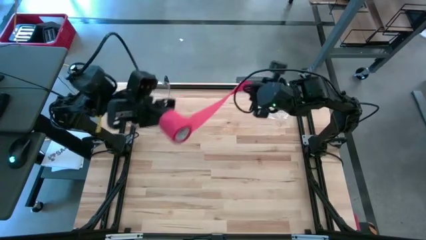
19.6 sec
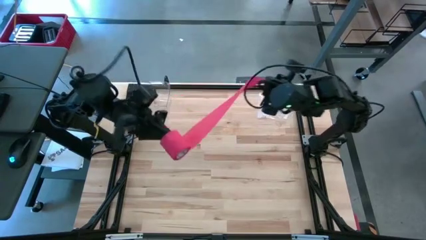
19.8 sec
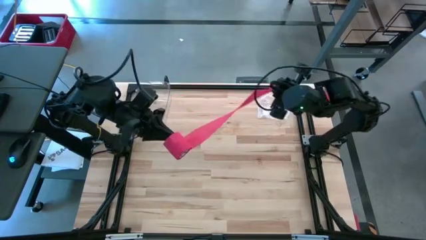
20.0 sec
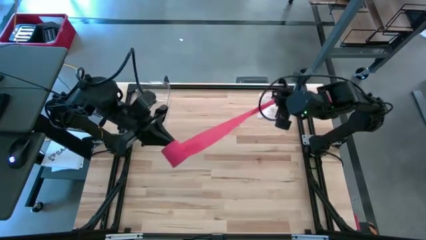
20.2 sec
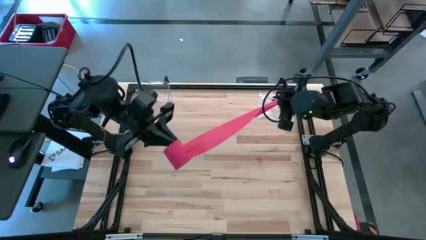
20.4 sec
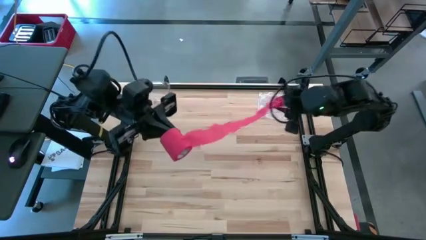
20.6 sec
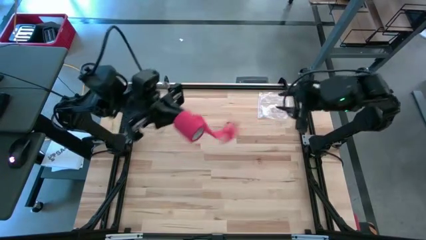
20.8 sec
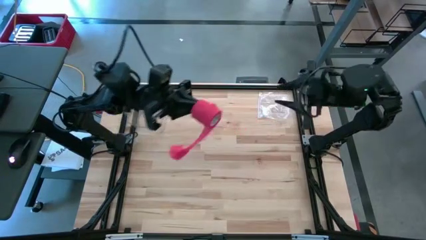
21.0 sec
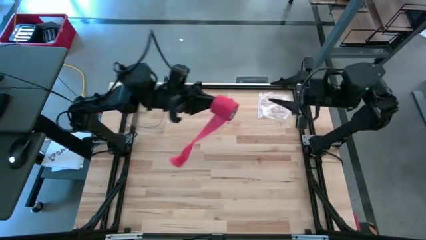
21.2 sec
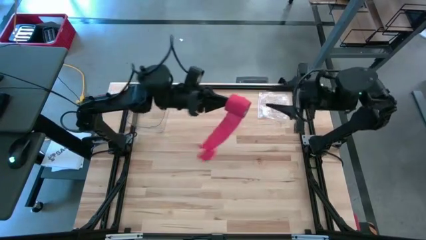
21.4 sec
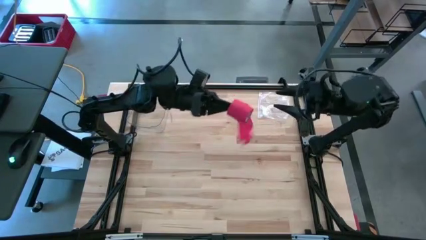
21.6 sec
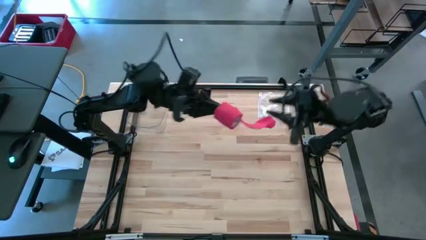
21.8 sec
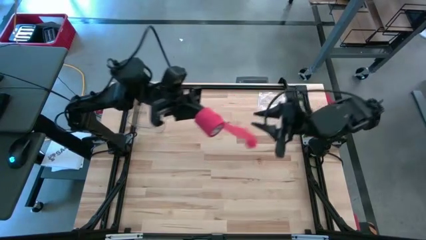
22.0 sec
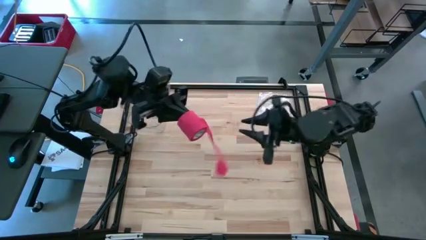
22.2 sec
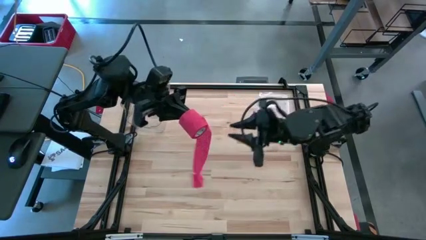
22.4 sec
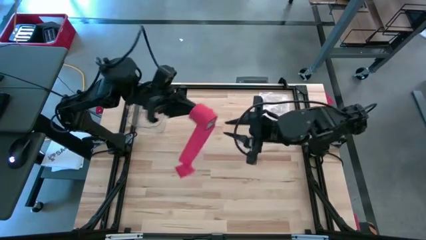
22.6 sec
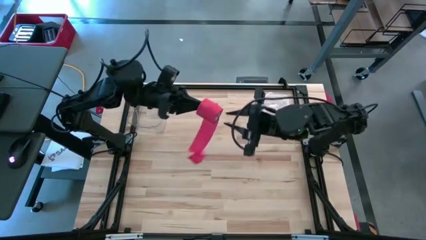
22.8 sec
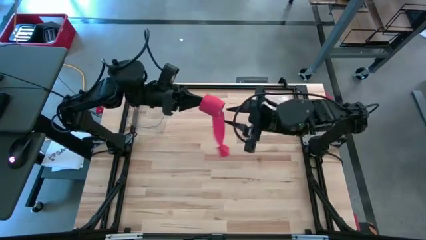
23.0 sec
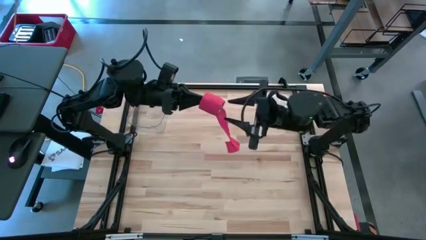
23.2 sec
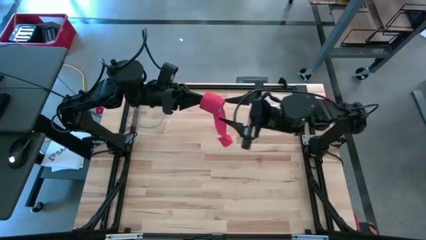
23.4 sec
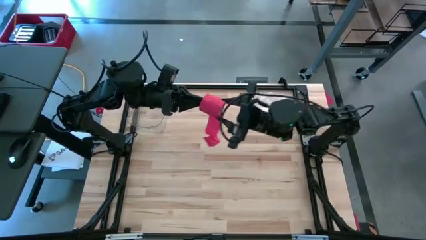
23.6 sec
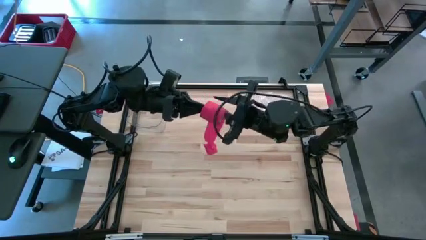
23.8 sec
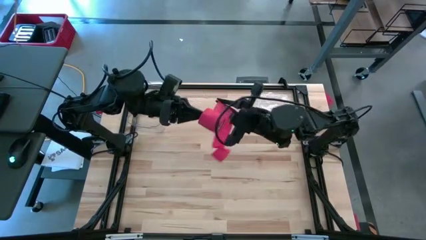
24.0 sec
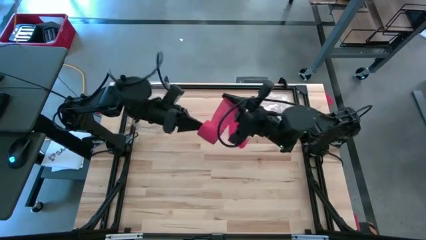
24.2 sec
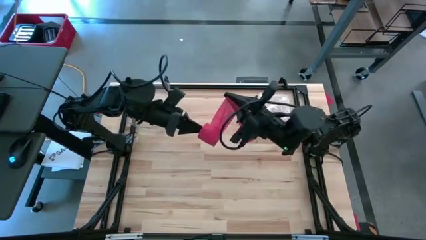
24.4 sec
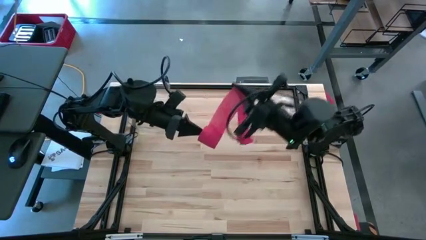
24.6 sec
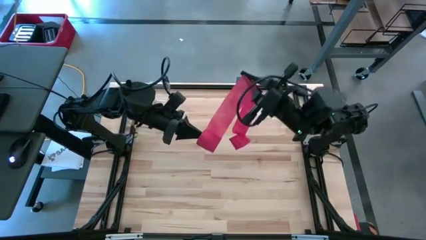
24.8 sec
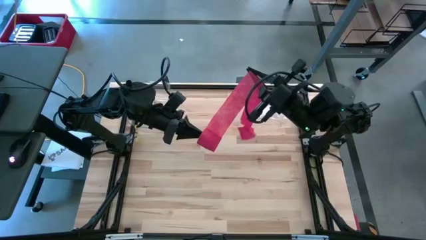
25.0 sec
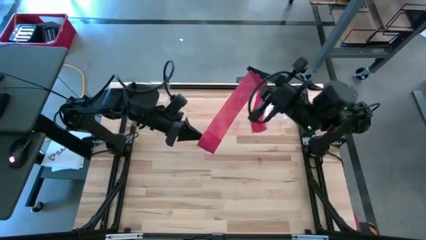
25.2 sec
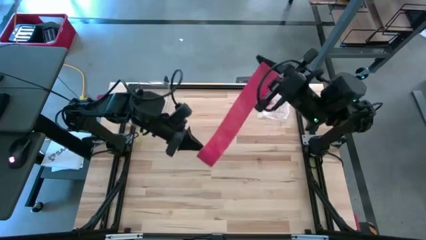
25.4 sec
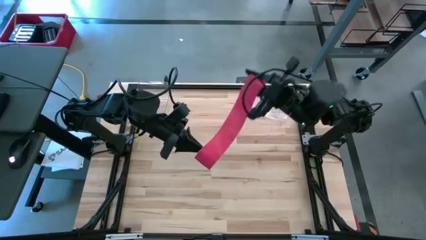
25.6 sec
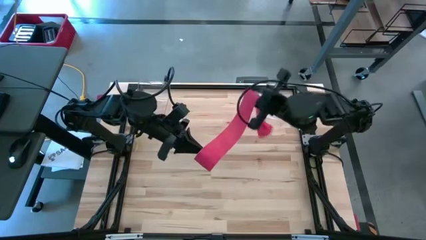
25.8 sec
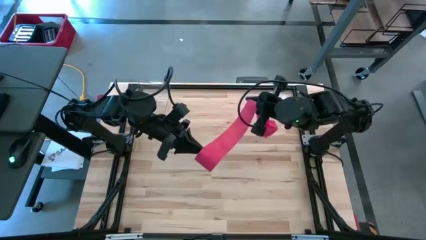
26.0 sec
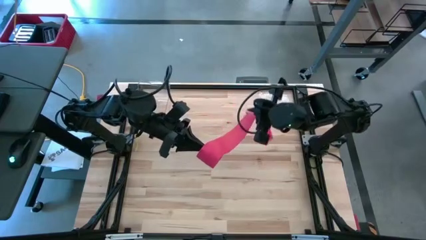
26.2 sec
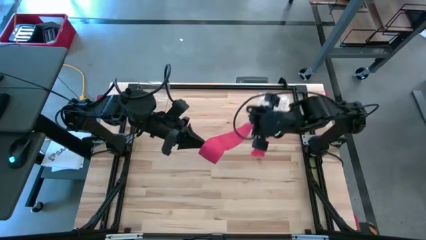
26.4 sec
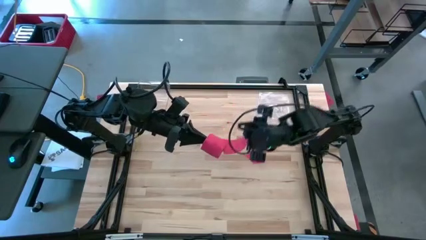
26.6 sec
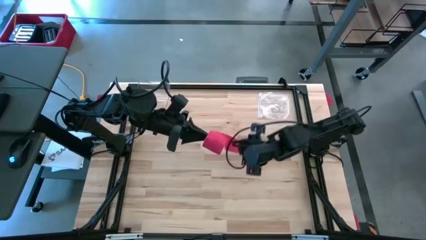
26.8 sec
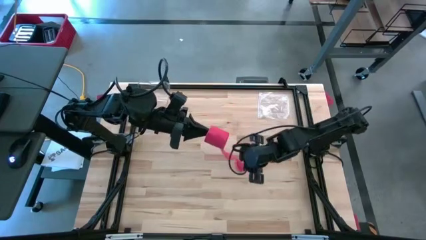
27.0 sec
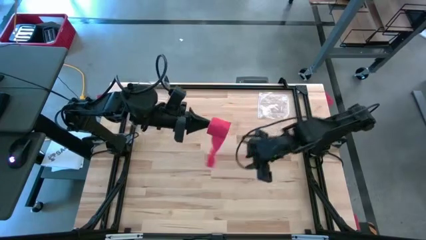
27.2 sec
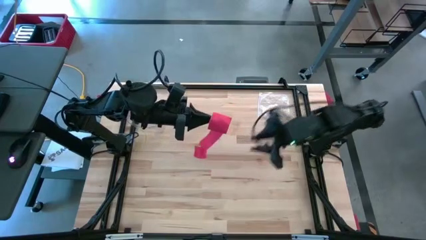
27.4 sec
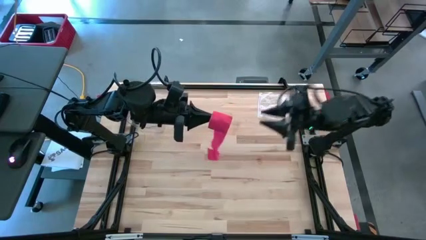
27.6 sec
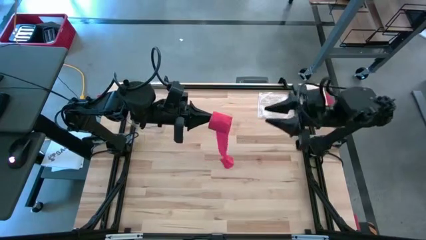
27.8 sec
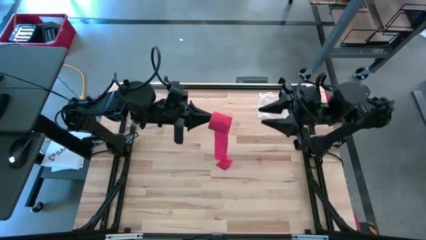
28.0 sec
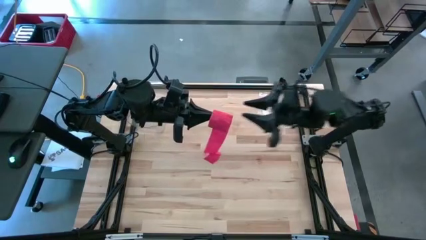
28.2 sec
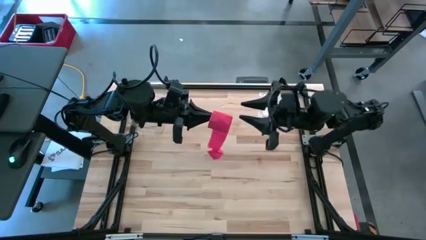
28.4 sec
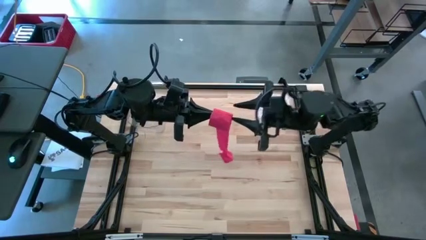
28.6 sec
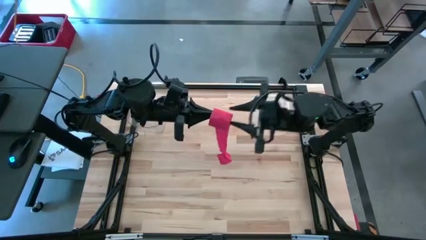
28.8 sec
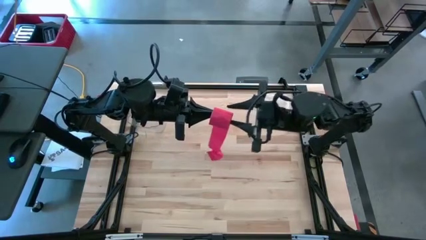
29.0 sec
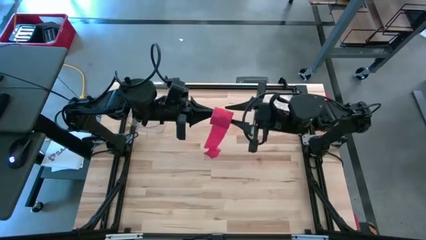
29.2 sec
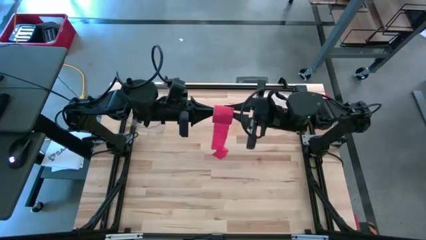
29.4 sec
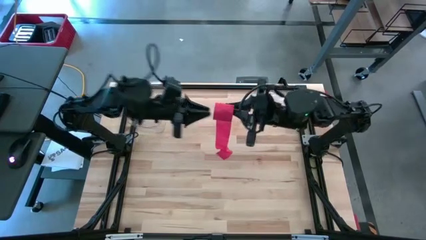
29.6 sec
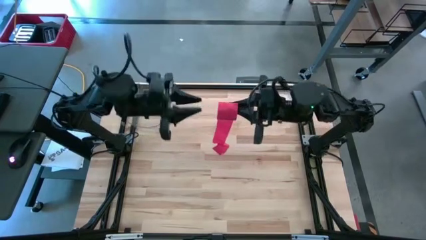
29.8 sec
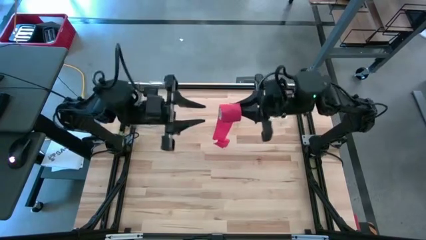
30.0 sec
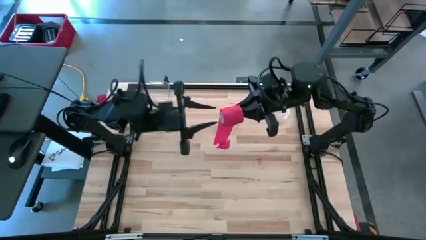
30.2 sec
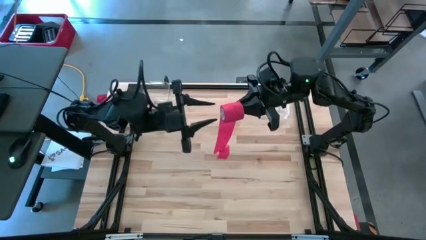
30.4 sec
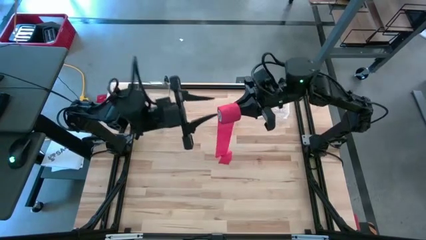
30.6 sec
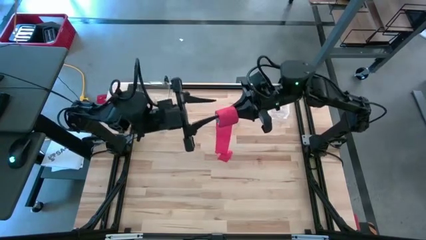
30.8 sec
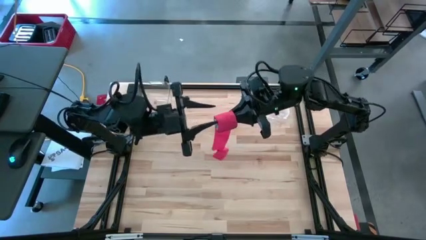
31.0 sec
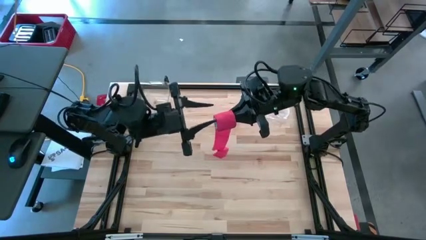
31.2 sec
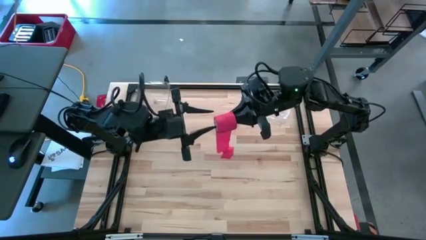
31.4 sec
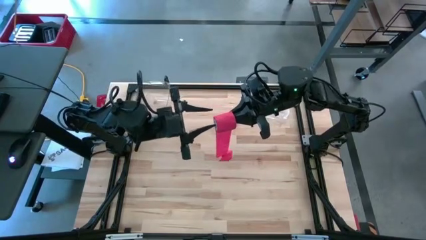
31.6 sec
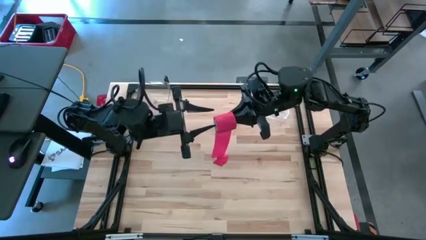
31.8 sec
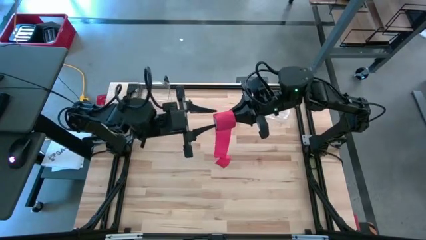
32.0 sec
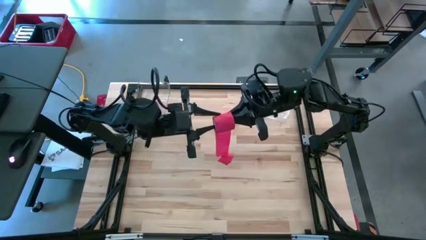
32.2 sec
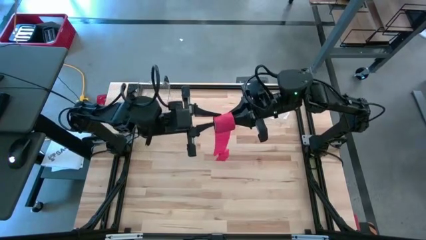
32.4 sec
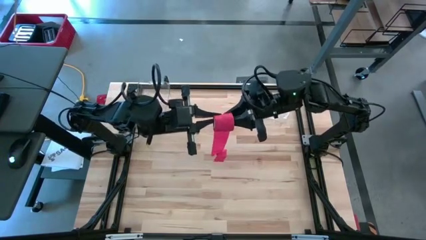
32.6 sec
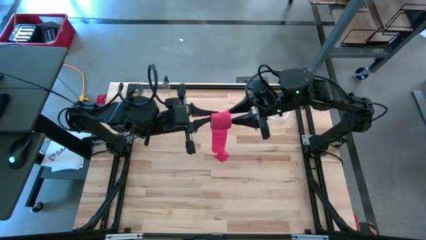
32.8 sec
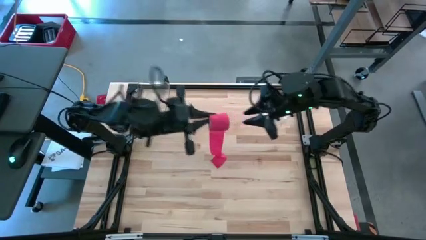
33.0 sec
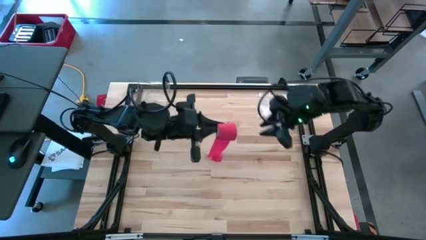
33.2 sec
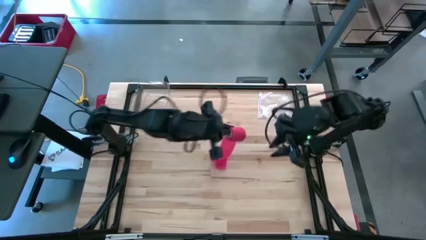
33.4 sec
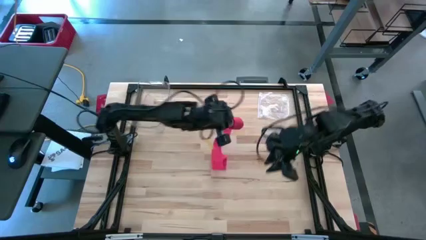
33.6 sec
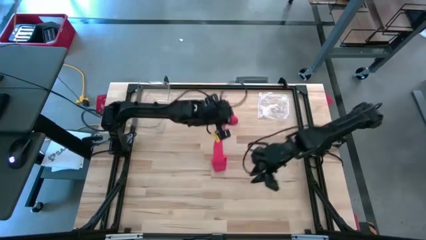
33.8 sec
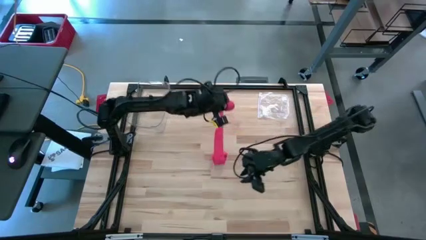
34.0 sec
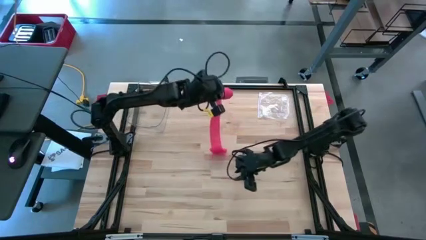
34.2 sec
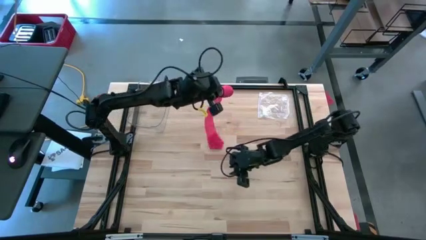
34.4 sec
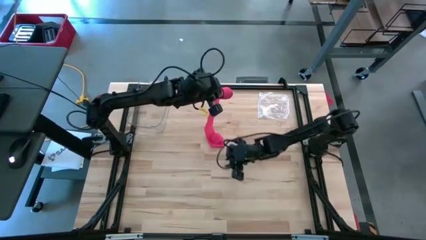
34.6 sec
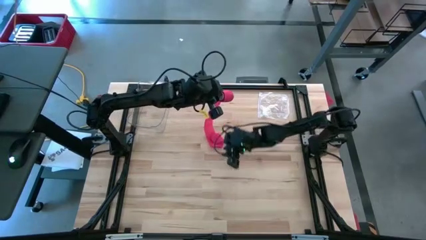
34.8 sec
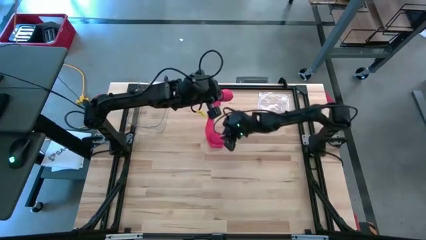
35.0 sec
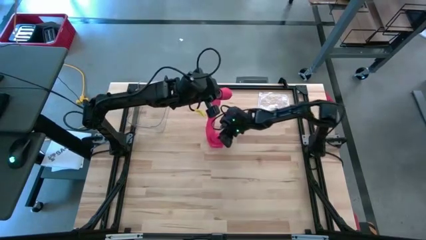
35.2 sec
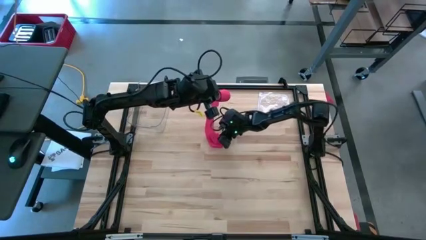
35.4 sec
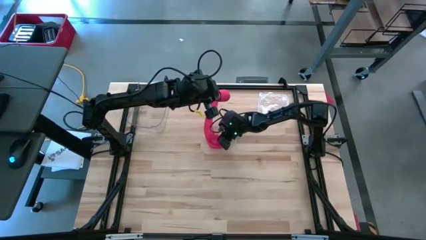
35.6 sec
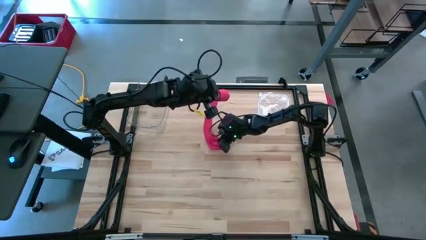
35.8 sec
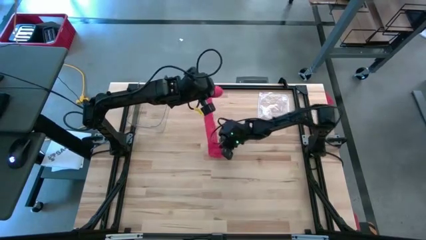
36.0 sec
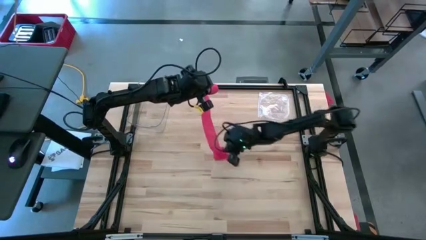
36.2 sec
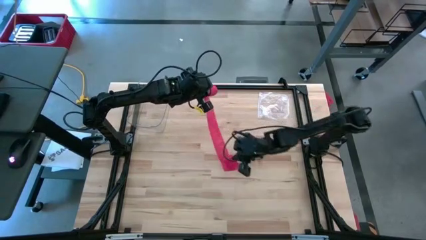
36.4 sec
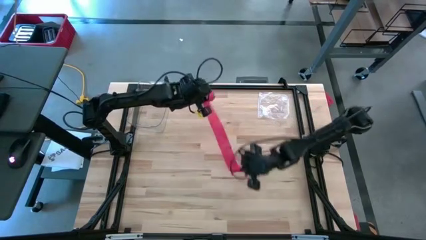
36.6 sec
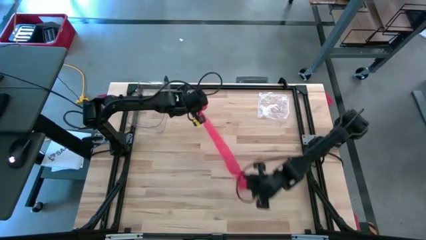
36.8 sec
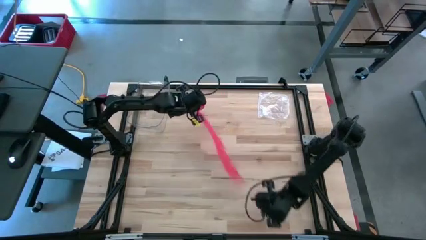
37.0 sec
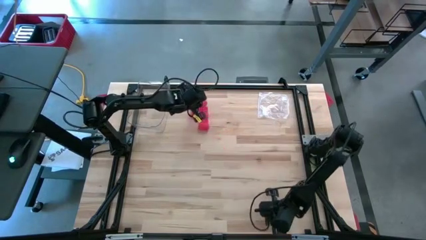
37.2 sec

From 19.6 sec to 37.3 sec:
Task: Roll bandage
Roll the red bandage
